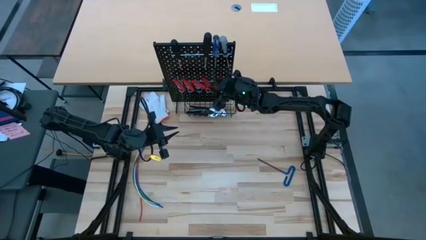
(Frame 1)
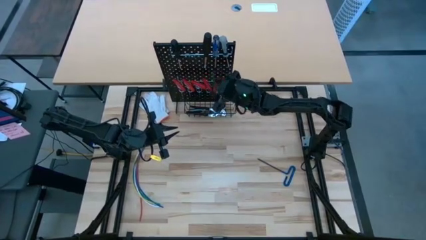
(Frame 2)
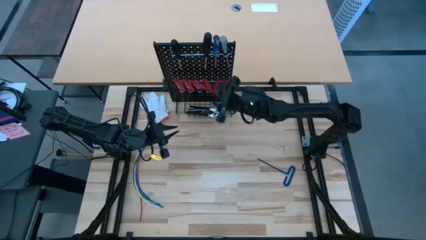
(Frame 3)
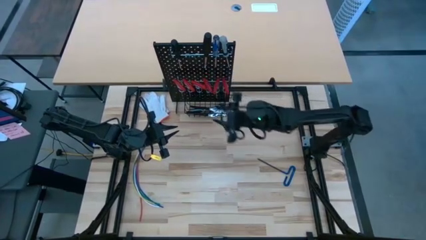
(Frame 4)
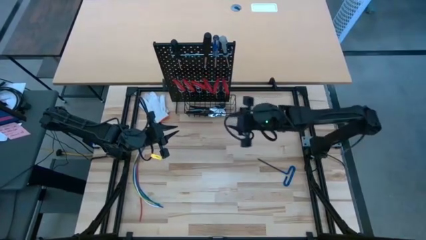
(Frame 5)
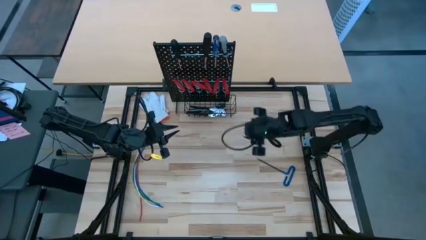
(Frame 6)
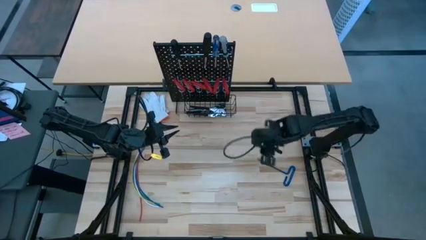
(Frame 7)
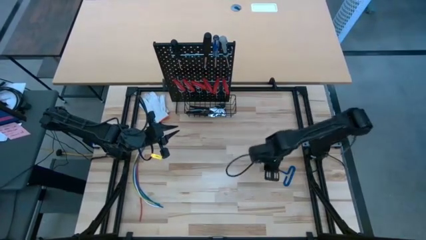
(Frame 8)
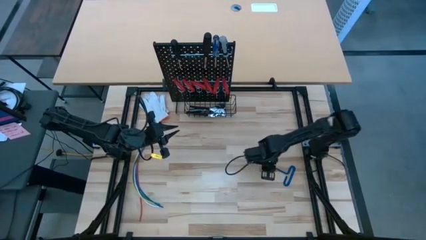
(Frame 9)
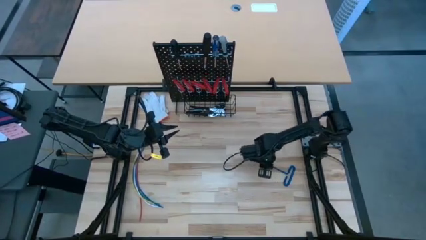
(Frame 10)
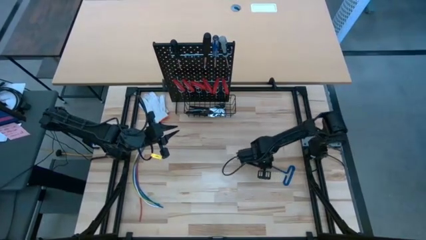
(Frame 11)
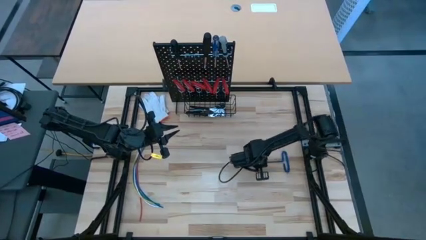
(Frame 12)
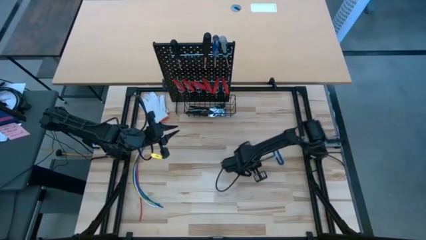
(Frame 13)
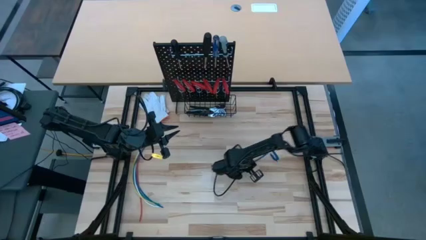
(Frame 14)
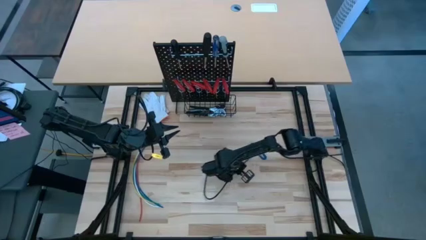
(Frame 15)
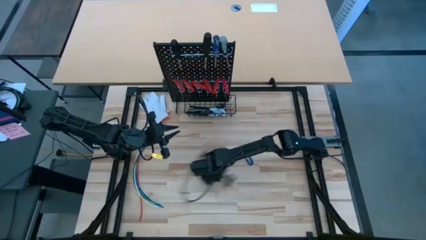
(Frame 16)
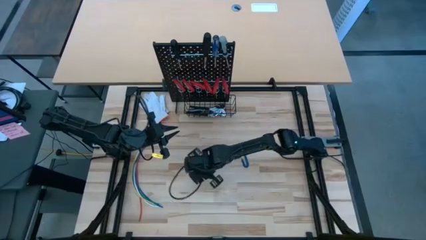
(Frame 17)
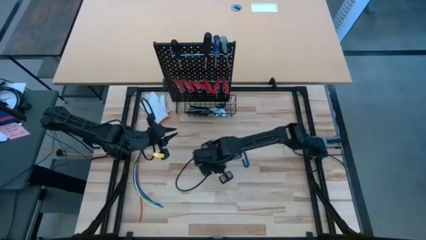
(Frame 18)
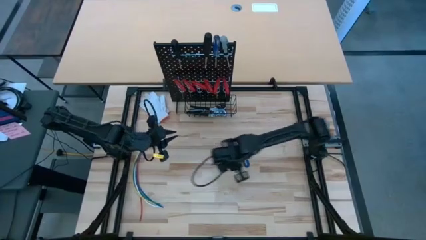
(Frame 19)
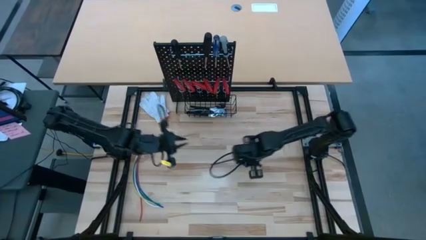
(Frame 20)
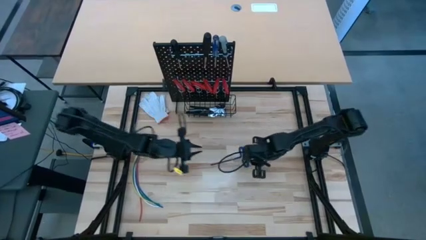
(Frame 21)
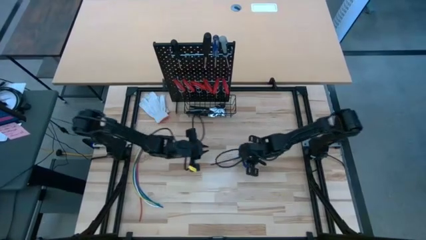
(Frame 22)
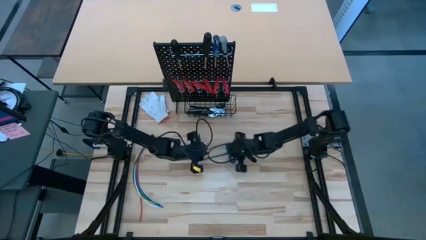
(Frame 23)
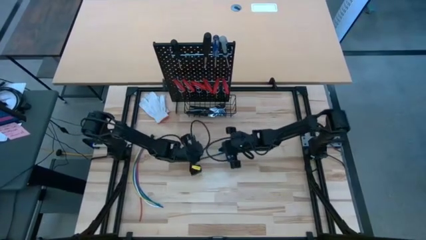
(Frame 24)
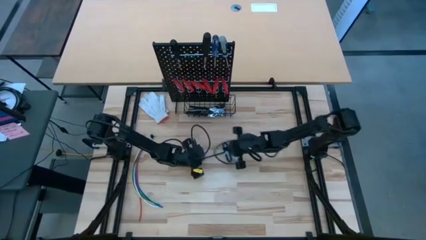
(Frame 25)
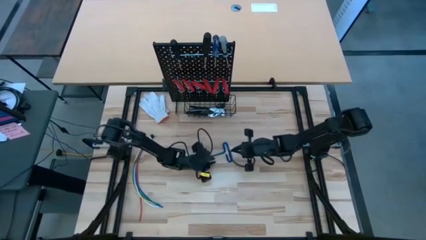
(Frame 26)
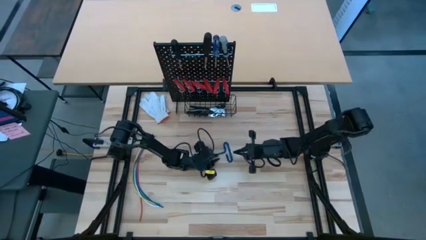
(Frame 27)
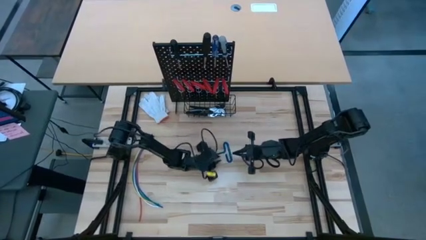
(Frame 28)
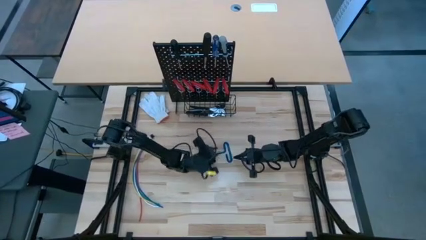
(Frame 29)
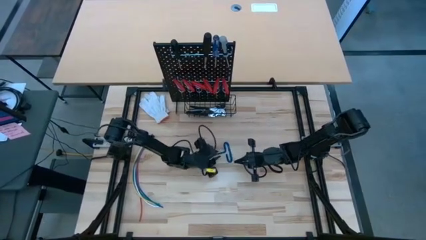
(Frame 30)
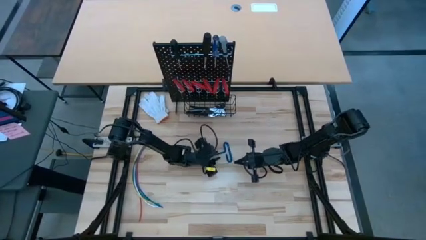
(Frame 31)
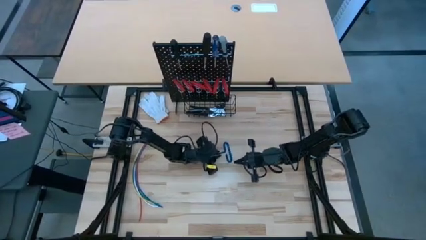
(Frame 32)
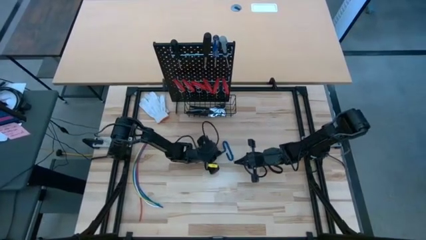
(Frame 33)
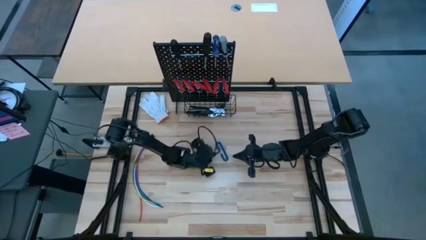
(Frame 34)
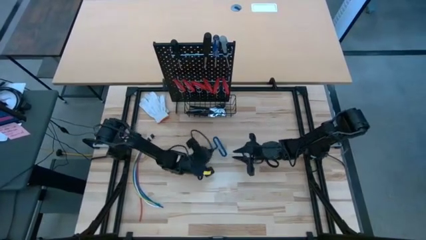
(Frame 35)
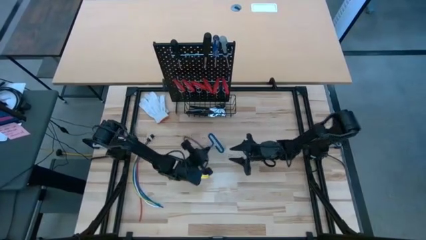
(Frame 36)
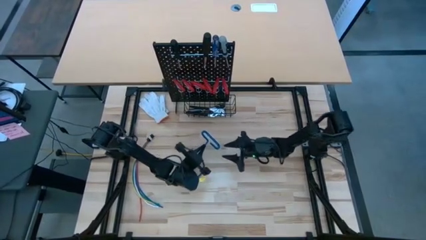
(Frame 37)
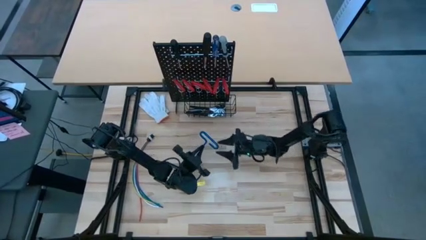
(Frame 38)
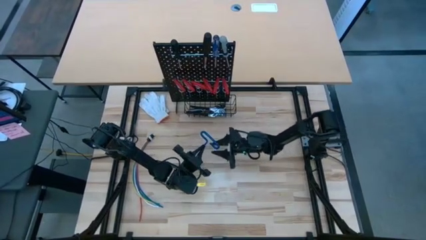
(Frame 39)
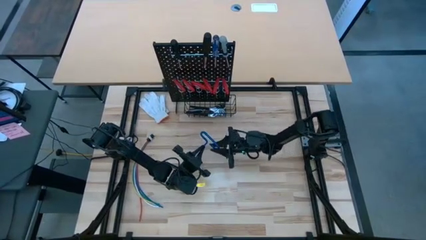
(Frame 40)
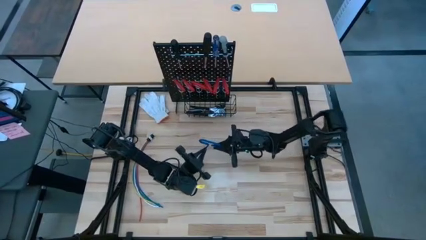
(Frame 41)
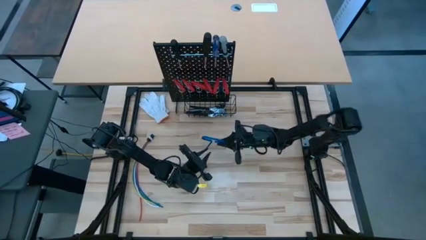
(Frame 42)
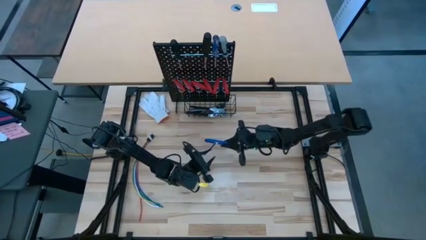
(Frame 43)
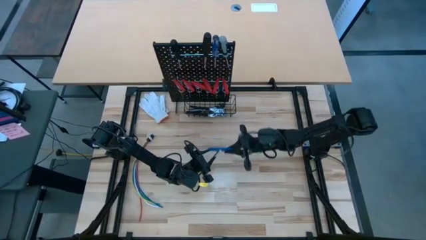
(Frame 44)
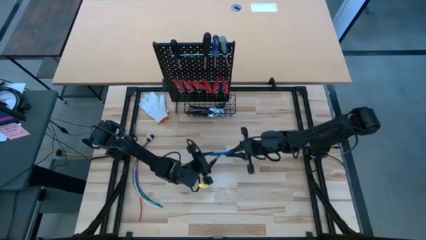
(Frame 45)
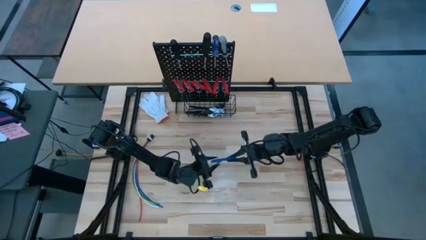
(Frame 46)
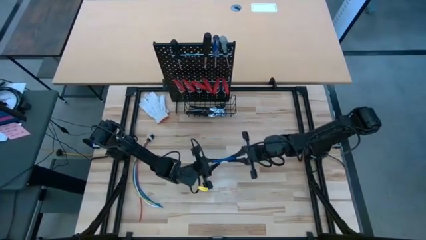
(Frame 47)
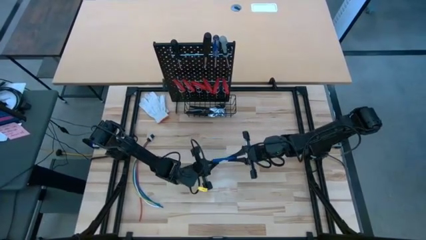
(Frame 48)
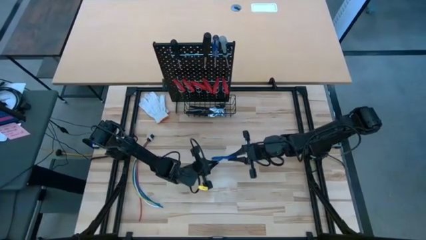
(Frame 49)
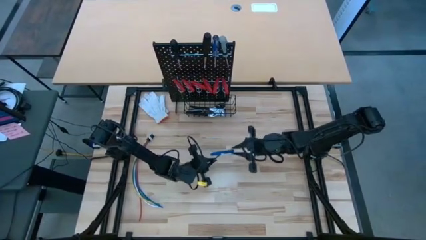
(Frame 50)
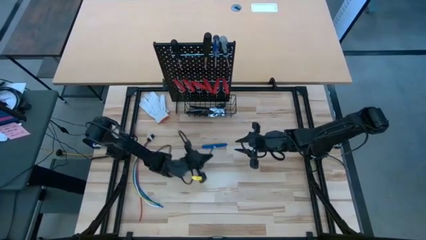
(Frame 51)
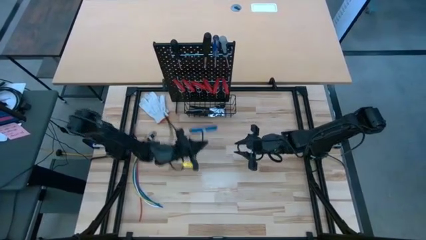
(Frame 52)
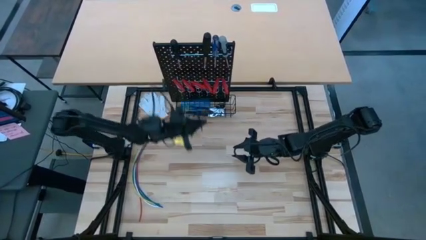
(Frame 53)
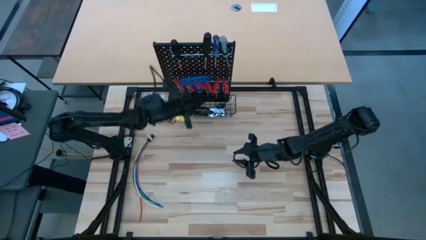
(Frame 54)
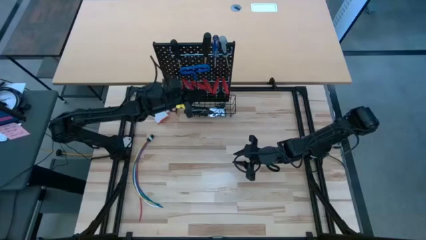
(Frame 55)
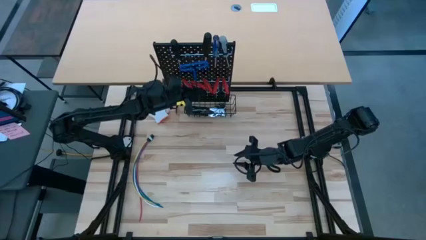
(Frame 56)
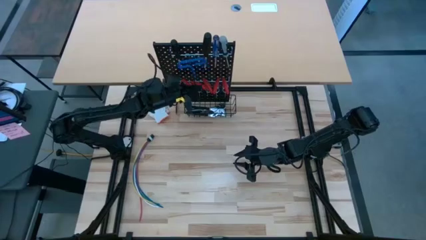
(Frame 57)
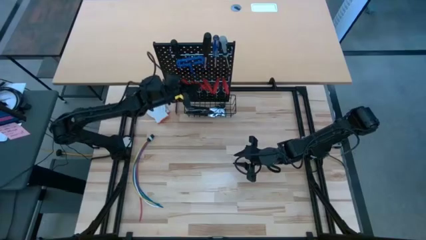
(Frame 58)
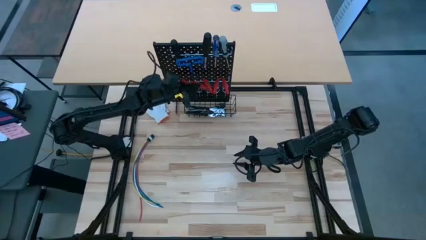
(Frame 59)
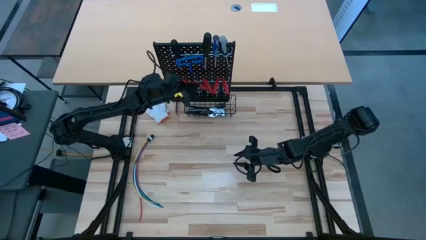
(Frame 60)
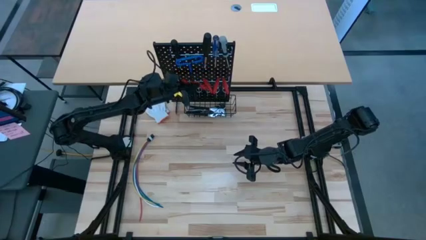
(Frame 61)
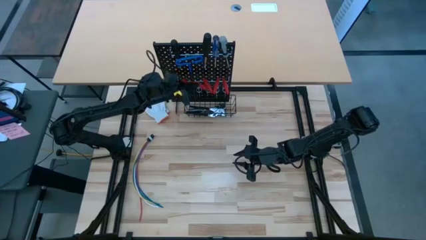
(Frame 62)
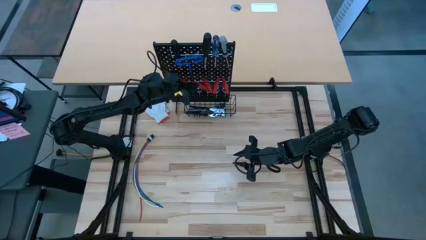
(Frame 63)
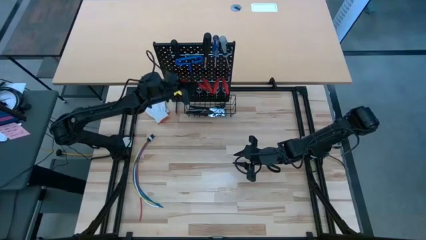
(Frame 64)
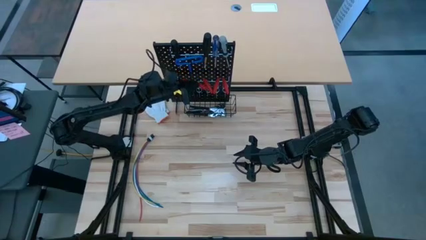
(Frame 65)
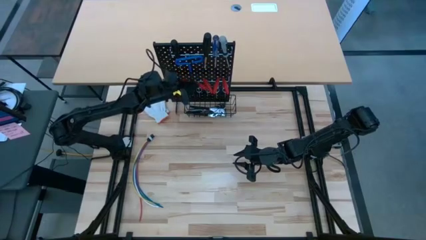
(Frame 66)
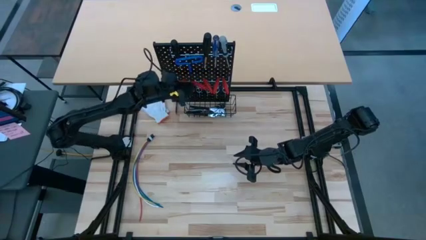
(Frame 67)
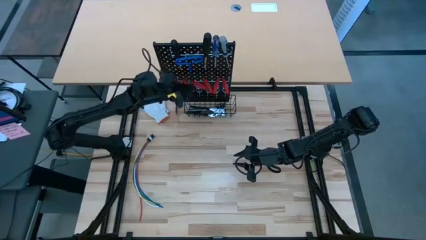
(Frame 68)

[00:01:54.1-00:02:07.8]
Task: Hang tools onto peg board
Hang the blue pick tool on the black pegboard

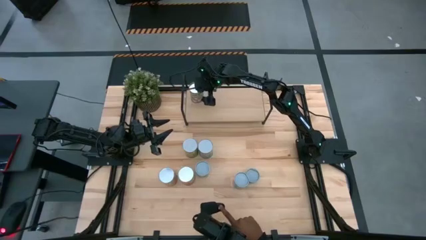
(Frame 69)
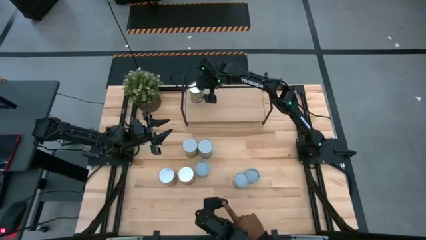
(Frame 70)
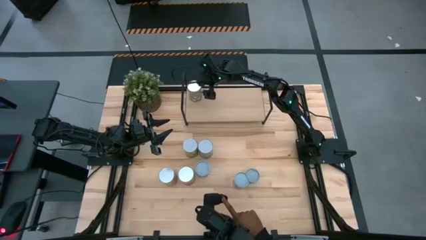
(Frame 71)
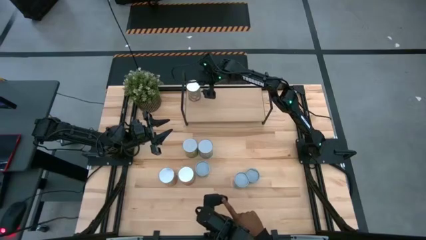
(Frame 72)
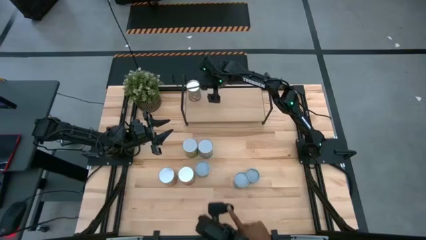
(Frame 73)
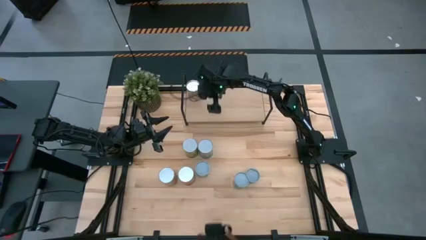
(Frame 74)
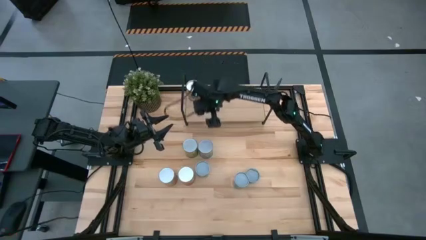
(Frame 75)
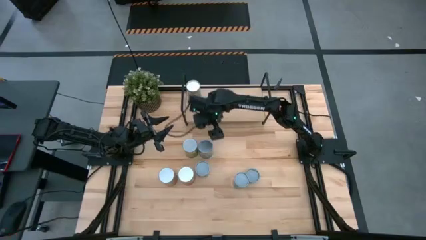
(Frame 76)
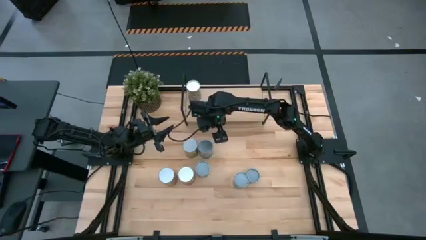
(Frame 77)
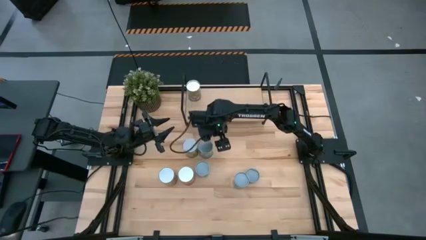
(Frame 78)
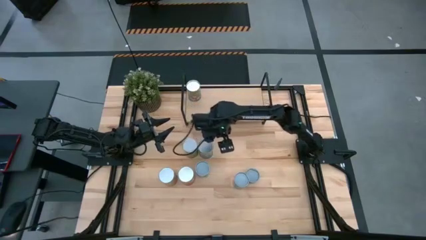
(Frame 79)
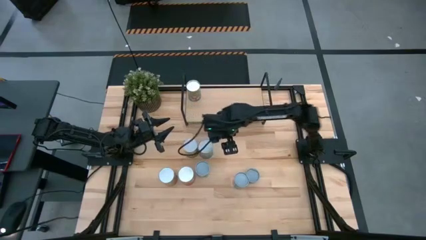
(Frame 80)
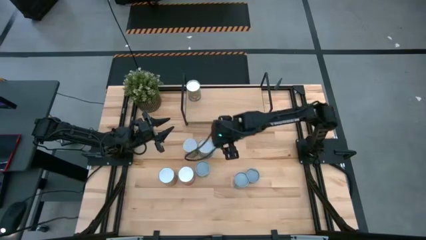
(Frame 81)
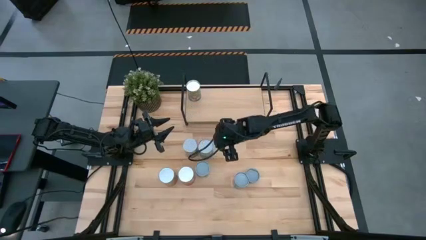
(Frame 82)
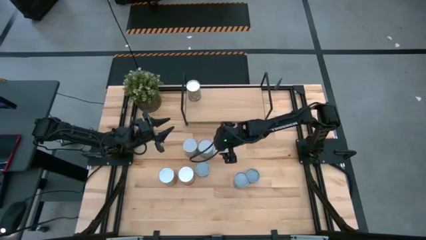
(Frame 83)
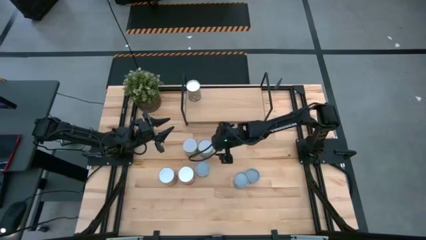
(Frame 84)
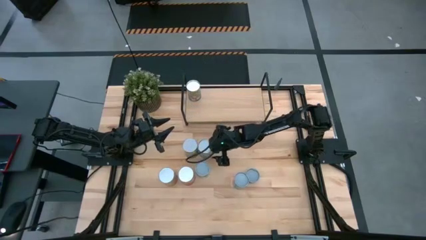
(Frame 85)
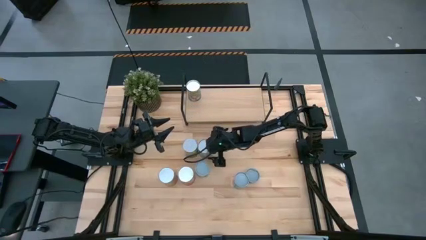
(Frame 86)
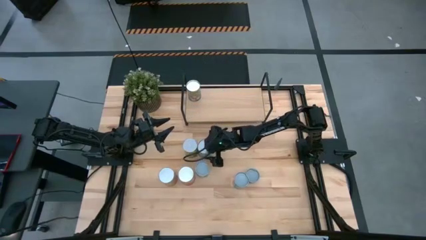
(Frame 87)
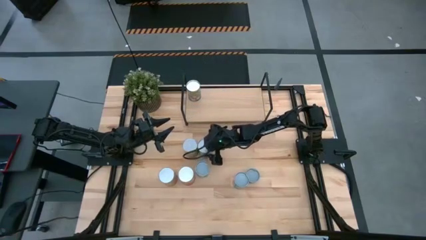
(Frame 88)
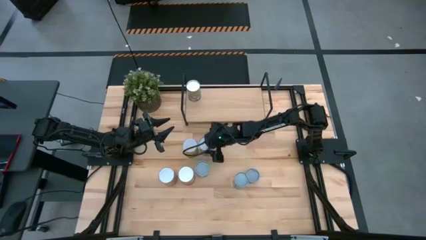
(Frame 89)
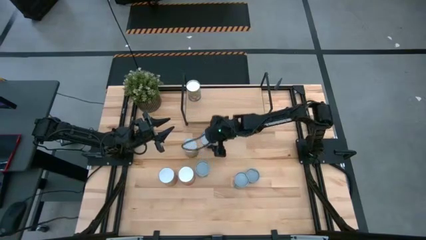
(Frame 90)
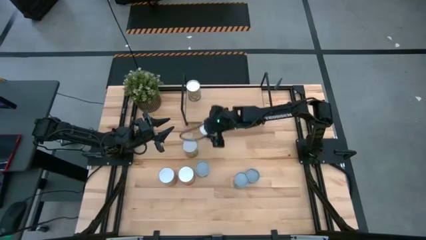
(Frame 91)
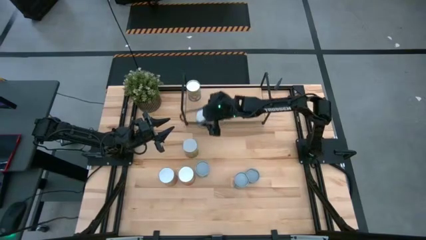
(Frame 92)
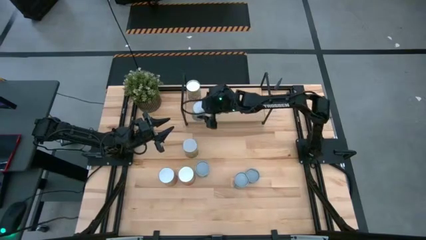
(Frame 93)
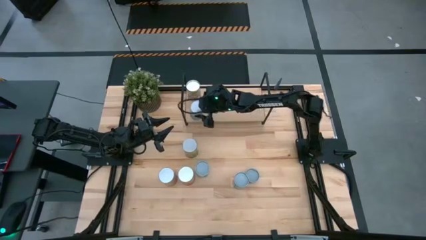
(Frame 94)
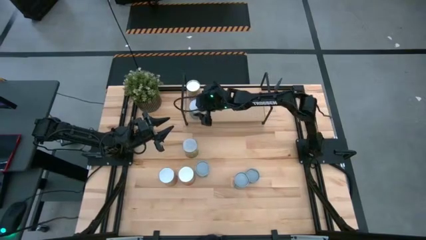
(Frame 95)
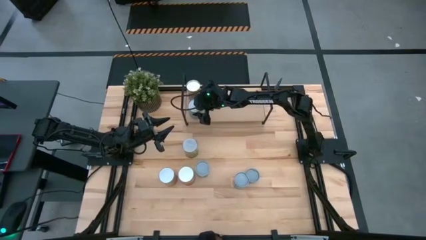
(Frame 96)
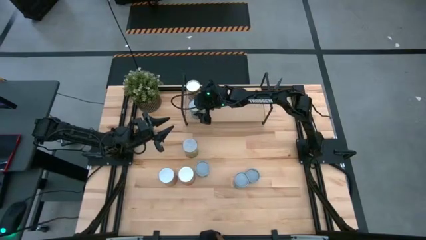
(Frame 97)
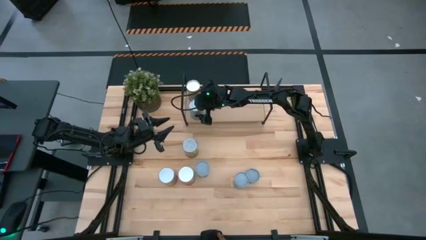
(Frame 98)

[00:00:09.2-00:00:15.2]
Task: Pick and place cans onto a shelf
Put the blue can on the shelf
